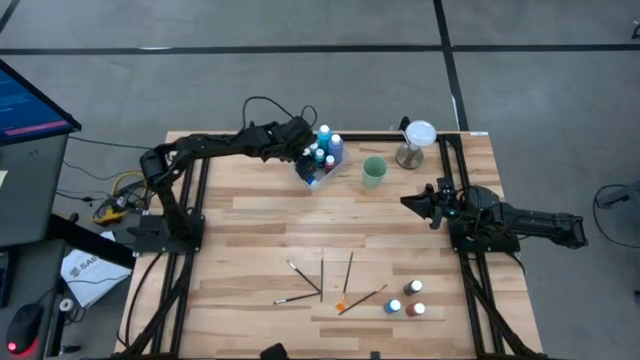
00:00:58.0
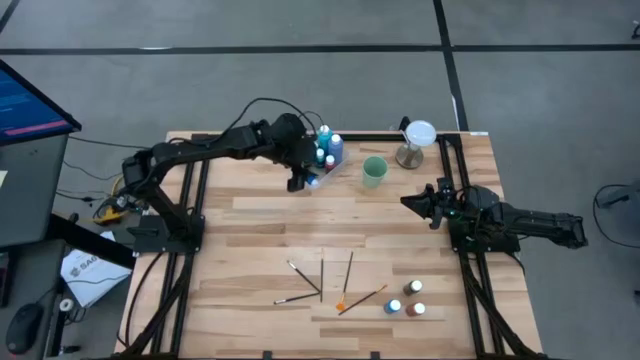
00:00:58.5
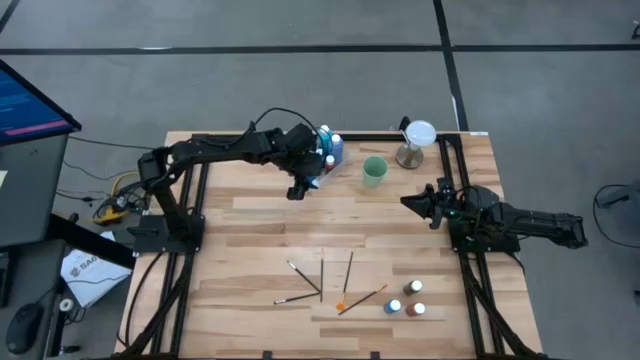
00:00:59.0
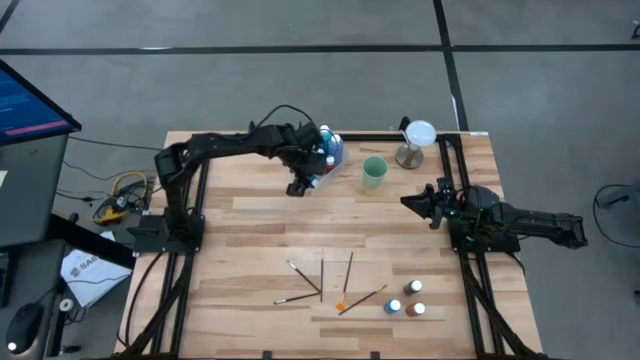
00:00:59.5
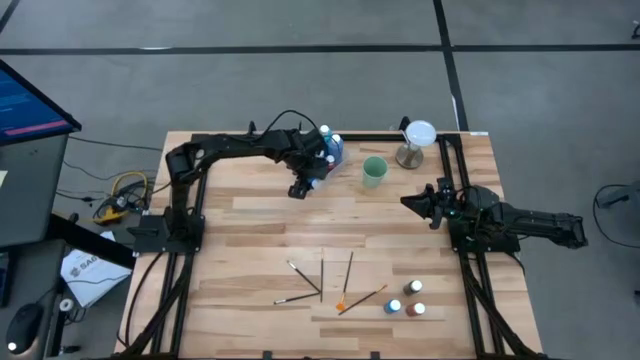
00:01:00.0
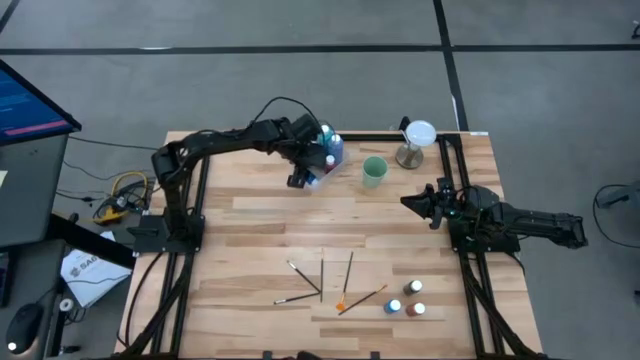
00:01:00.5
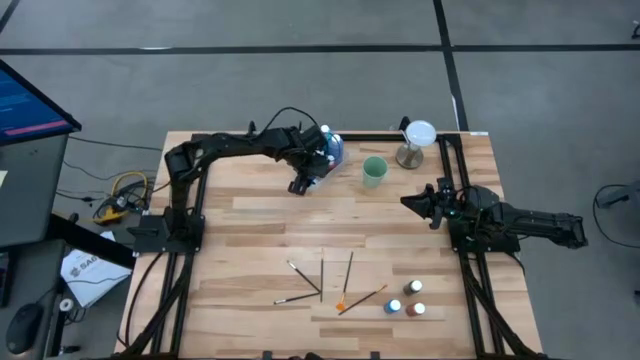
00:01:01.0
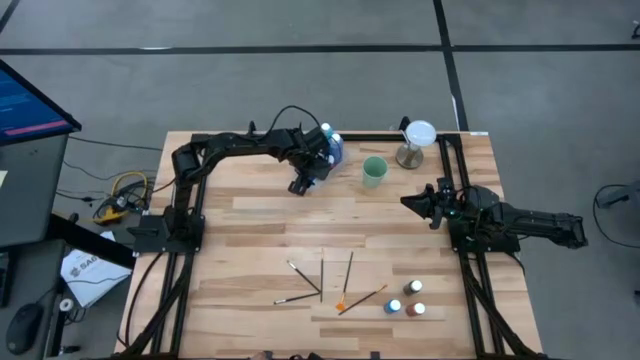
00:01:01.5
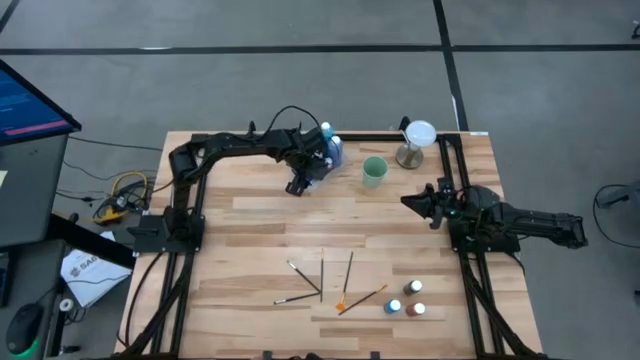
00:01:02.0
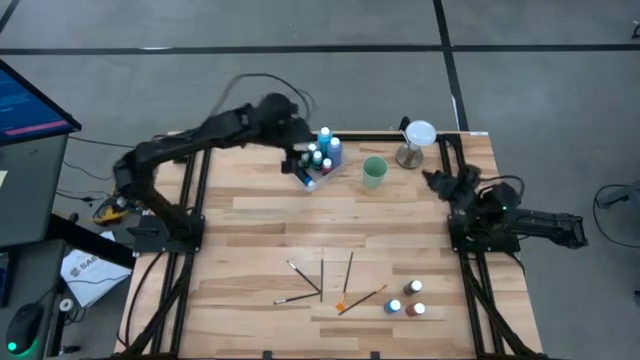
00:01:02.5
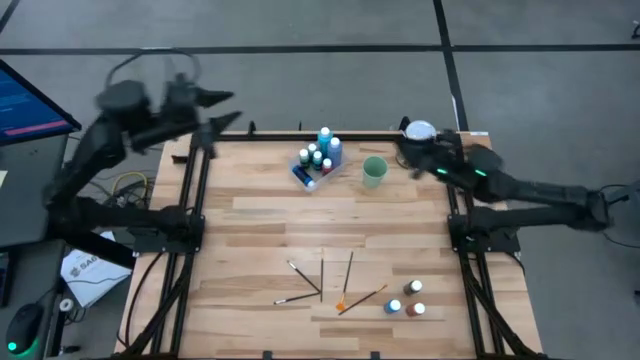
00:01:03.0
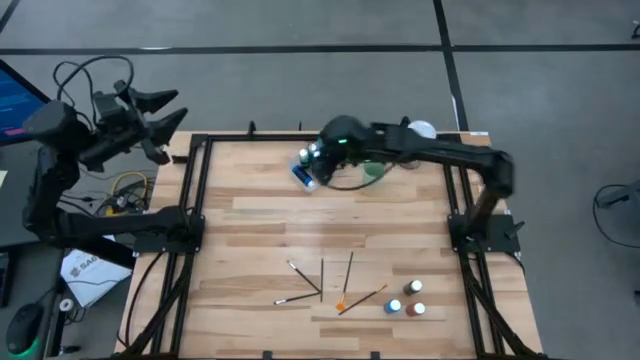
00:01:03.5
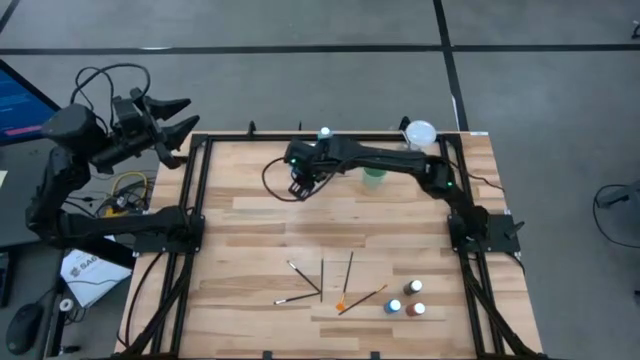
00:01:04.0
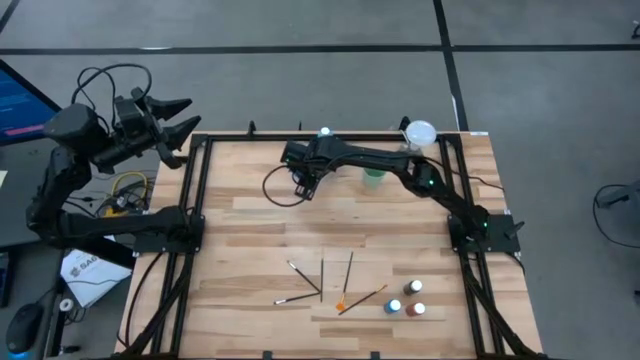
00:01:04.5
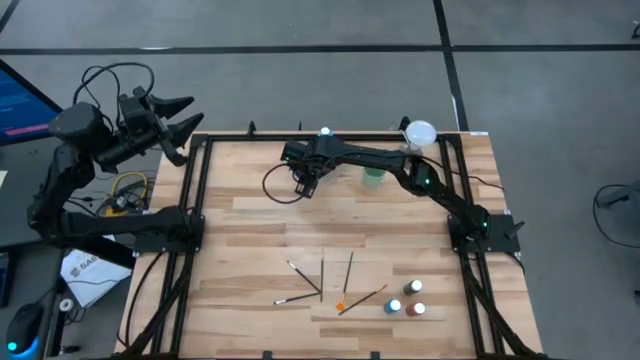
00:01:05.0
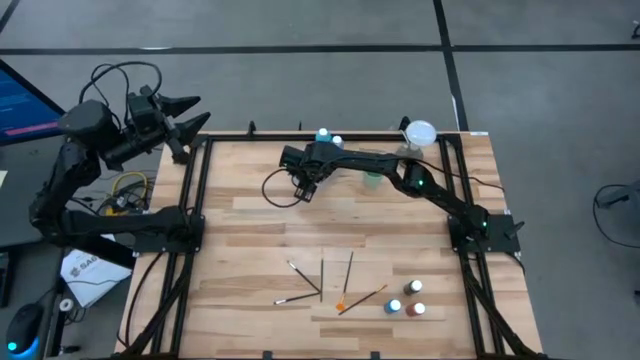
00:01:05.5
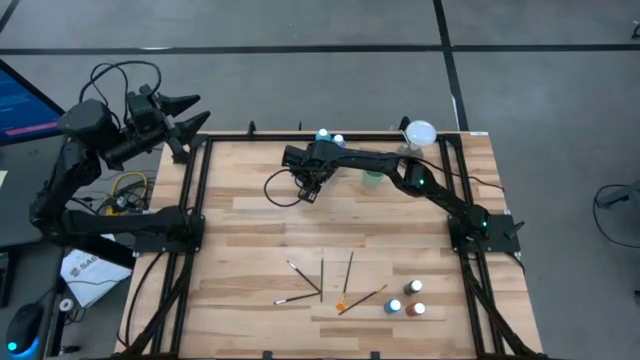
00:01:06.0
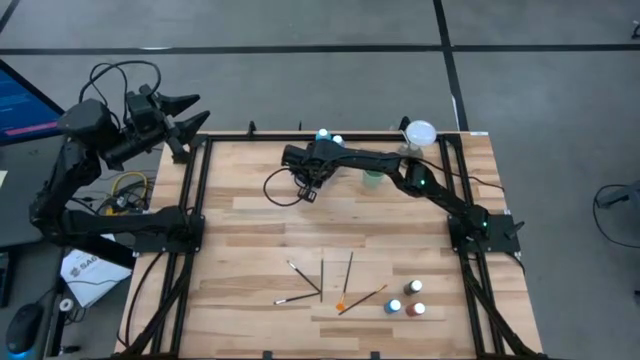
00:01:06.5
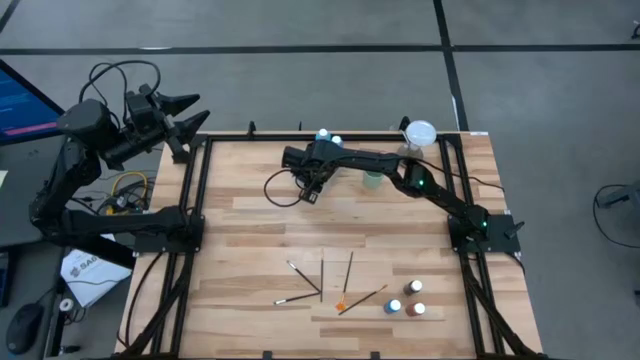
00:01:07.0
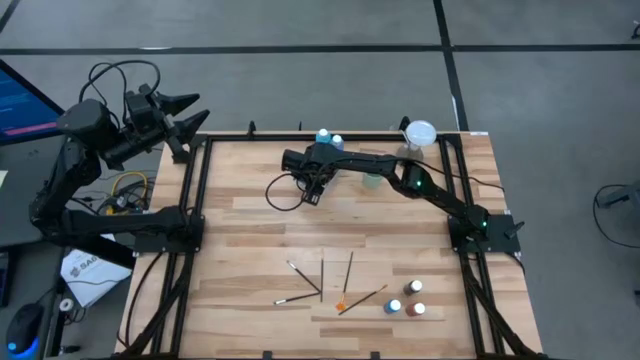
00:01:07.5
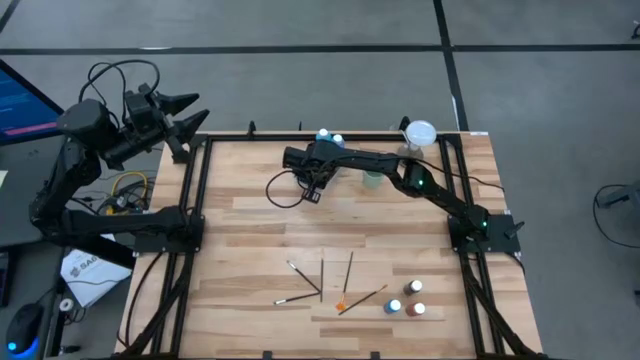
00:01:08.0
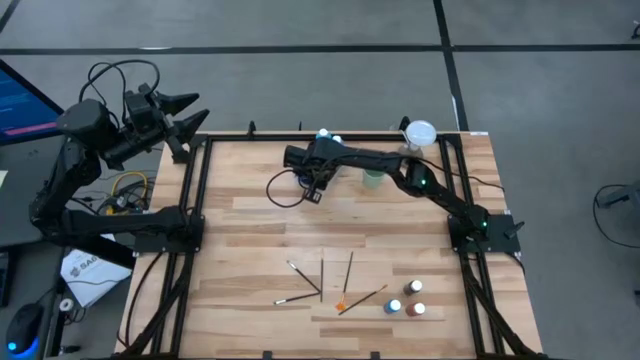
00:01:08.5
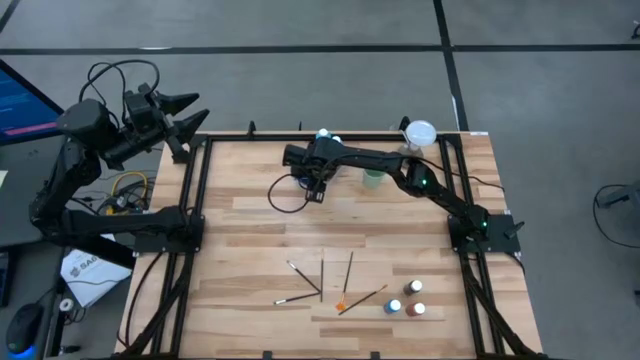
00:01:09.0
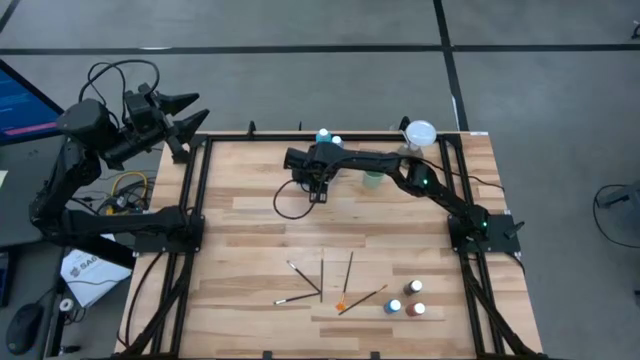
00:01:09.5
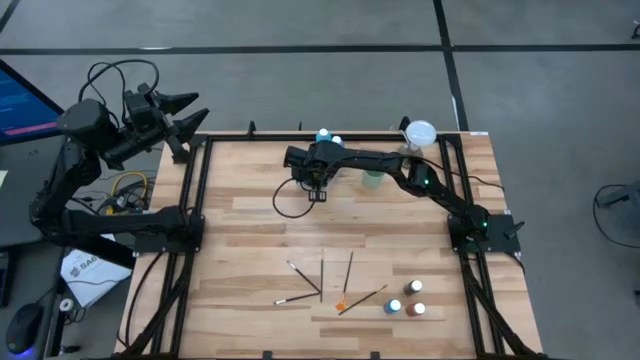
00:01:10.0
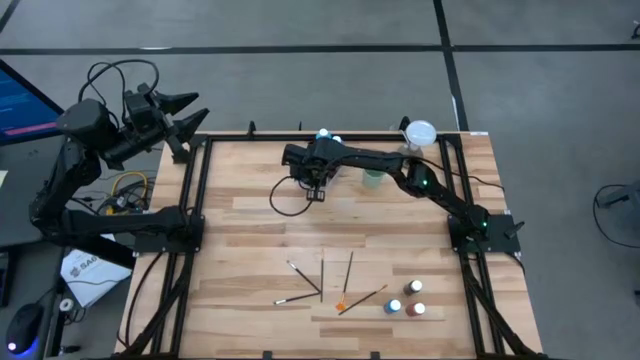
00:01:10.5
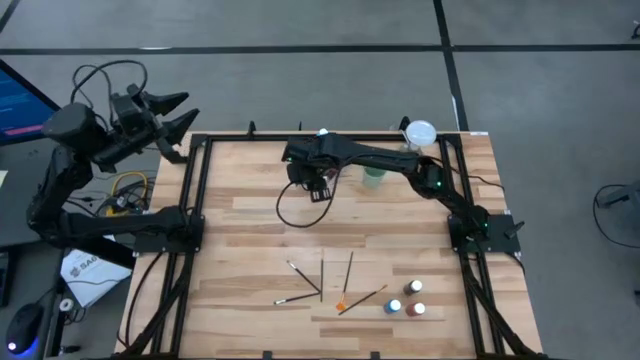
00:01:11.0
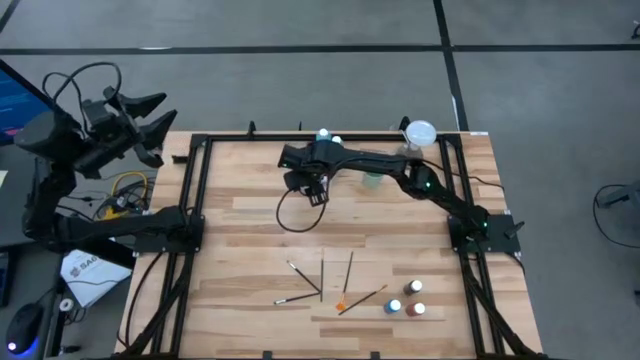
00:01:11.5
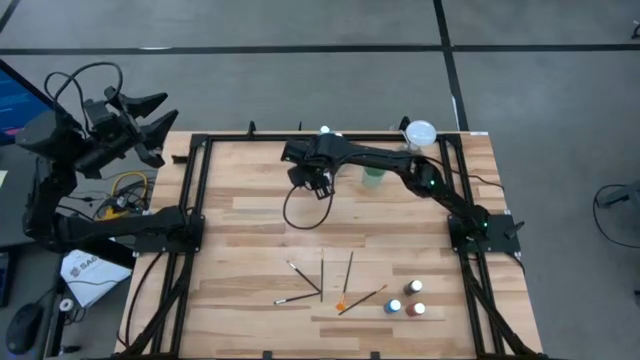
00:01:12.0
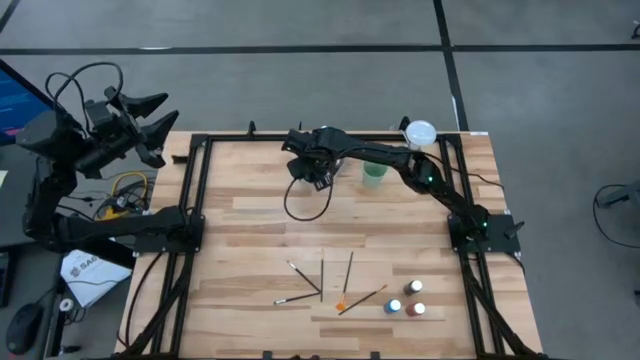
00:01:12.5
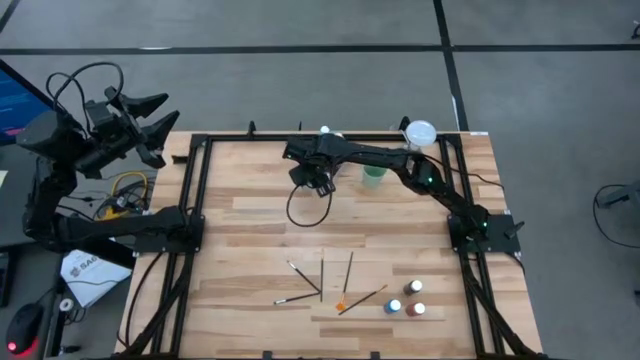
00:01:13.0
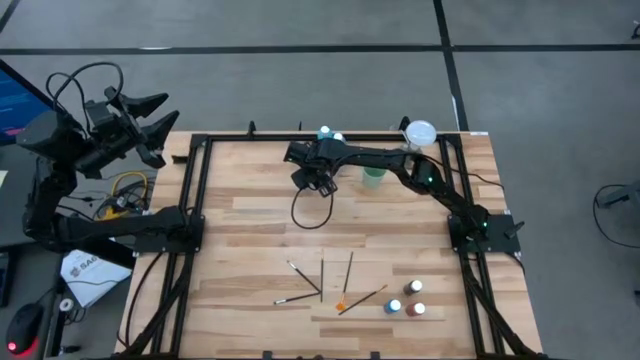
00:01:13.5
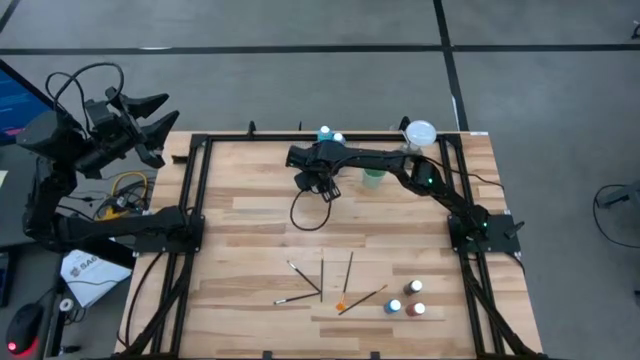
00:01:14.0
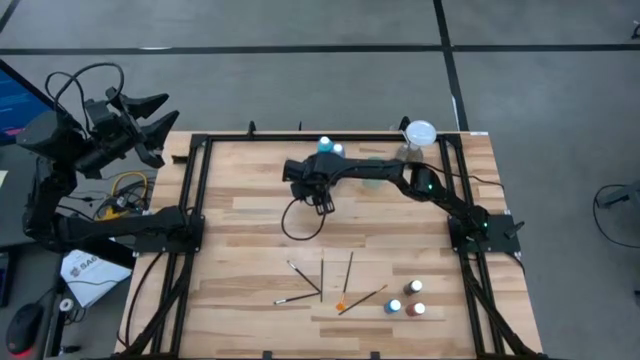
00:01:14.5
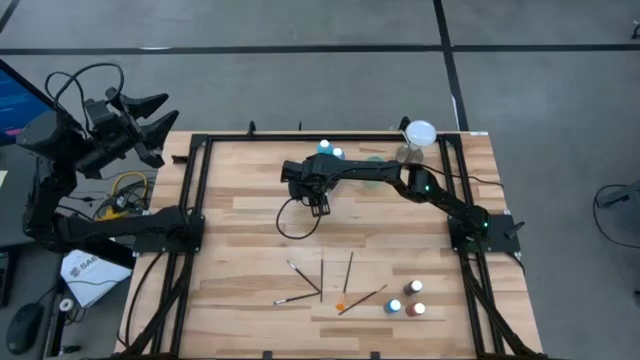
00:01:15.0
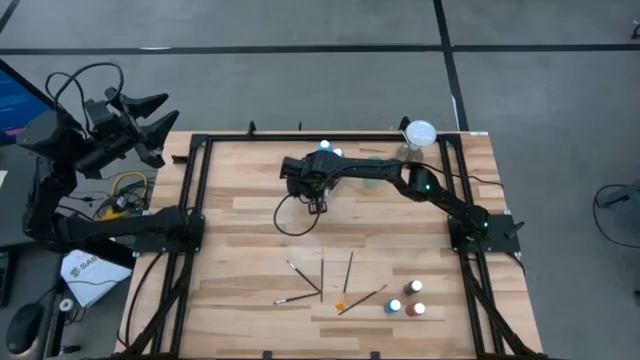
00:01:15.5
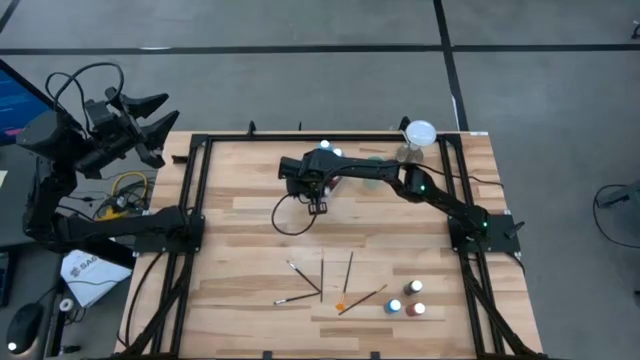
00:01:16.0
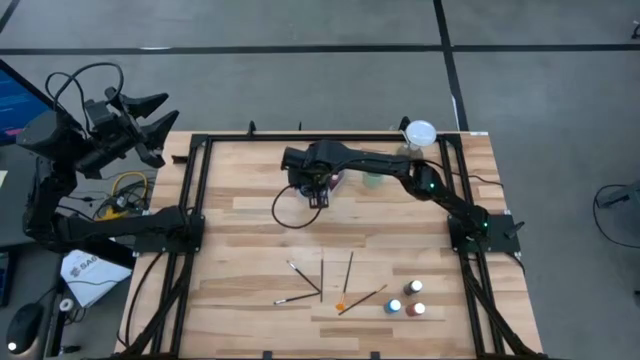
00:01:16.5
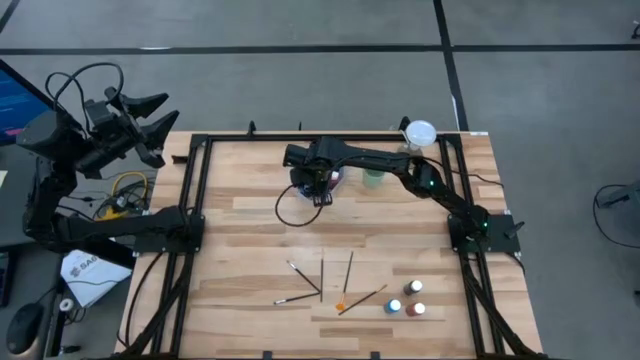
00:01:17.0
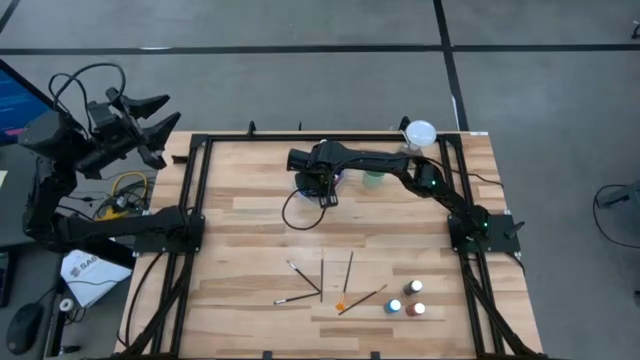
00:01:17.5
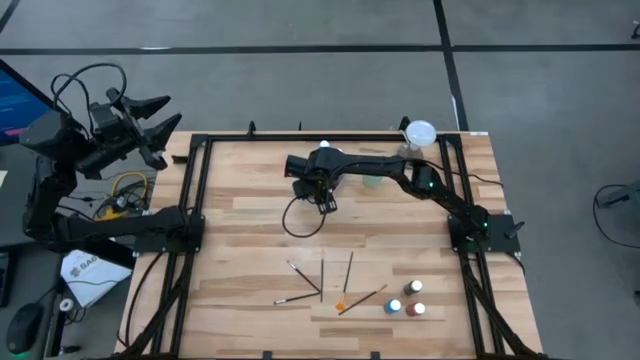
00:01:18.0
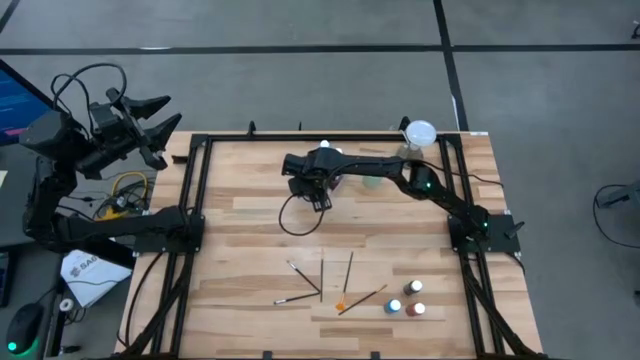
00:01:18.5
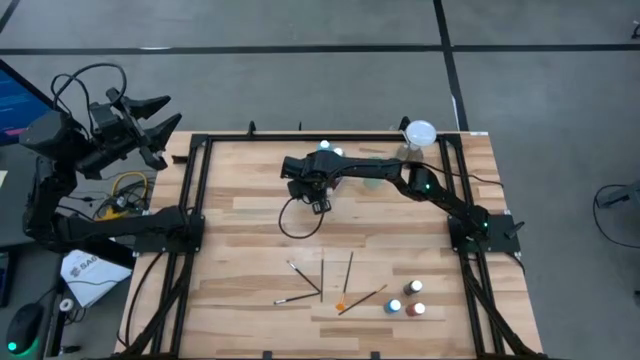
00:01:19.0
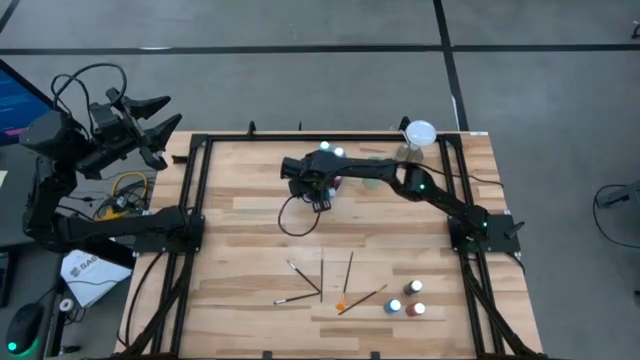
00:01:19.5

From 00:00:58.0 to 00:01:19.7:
Task: Pick & Place Paint Supplies
Adjust the small blue paint bottle in the transparent bin
